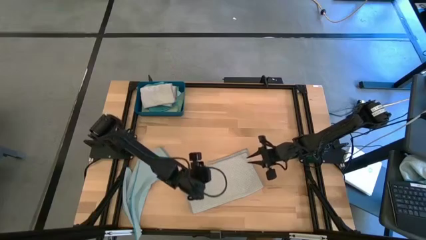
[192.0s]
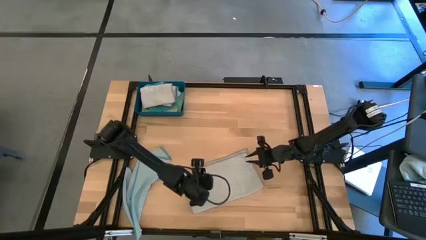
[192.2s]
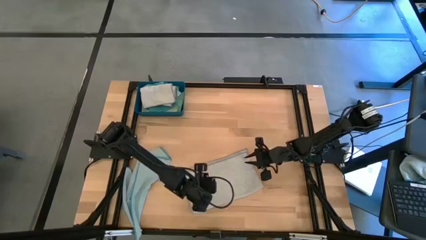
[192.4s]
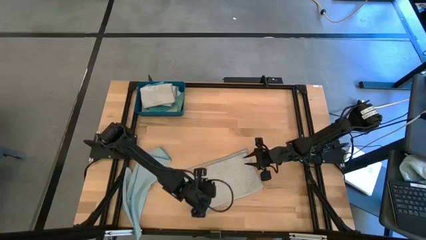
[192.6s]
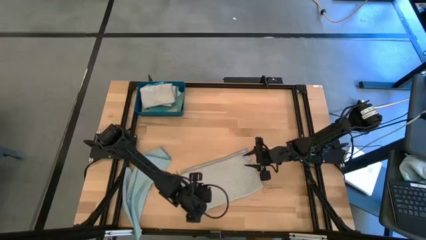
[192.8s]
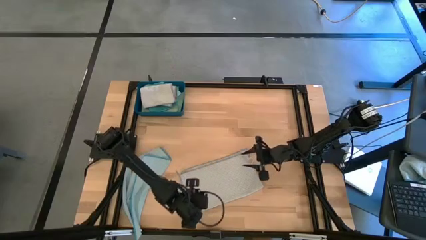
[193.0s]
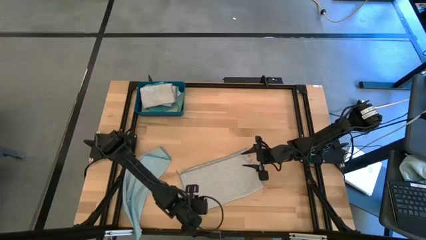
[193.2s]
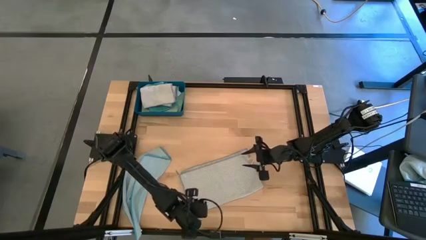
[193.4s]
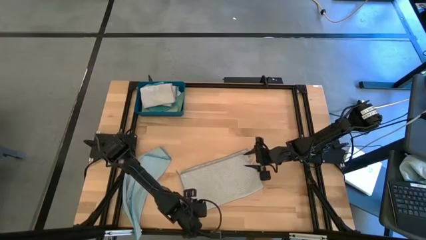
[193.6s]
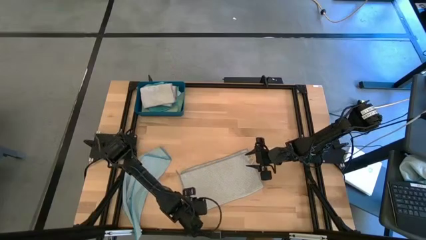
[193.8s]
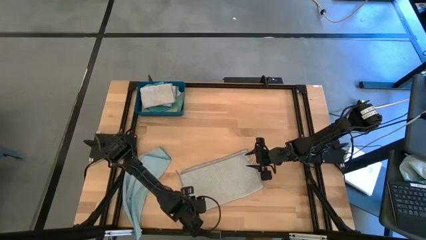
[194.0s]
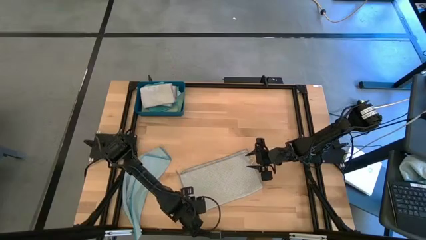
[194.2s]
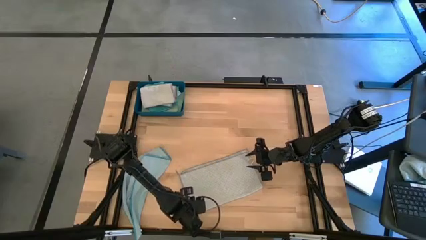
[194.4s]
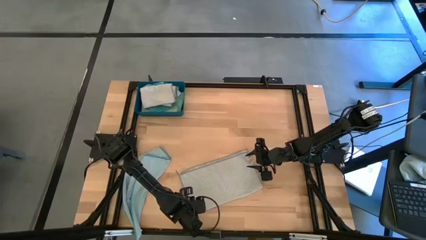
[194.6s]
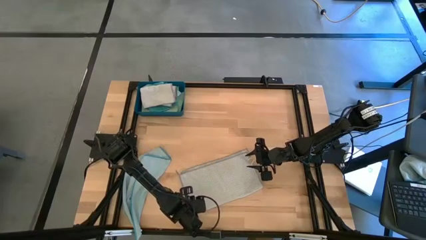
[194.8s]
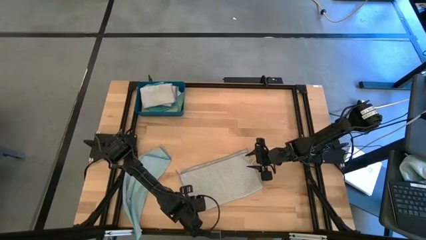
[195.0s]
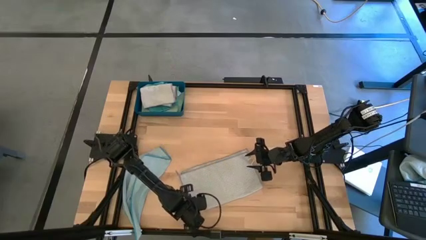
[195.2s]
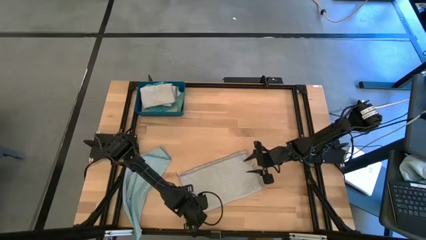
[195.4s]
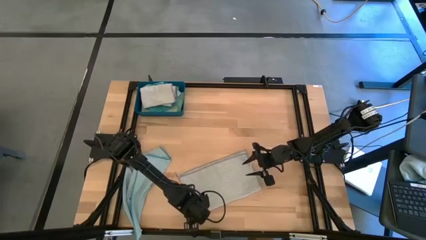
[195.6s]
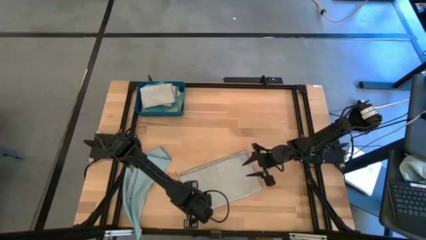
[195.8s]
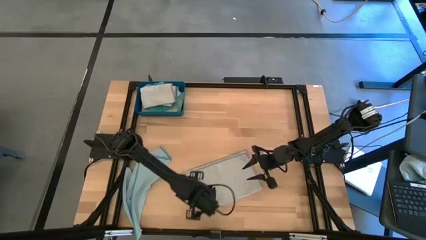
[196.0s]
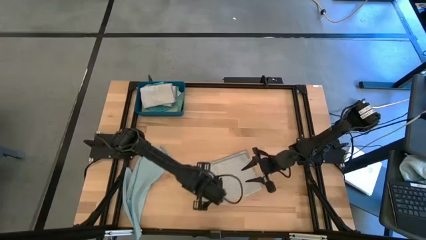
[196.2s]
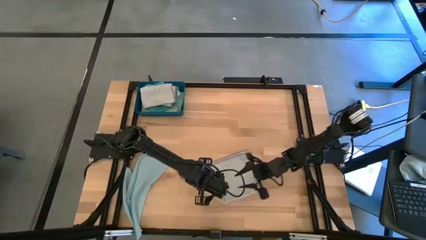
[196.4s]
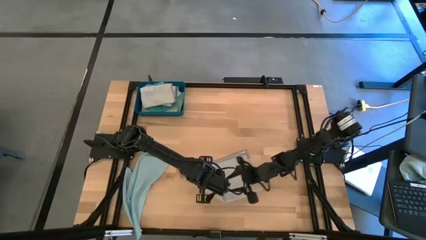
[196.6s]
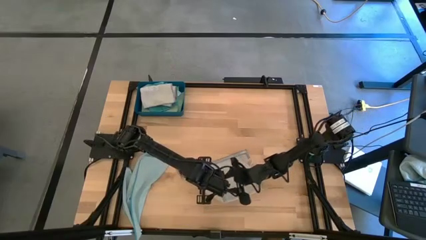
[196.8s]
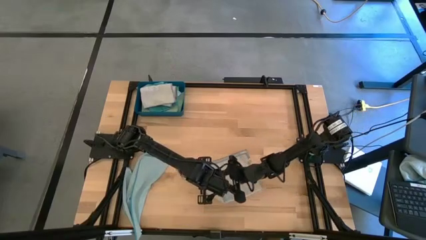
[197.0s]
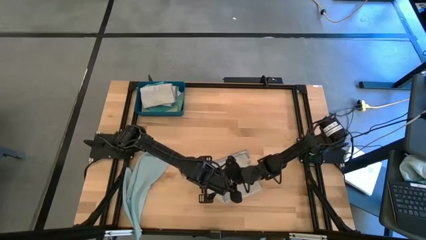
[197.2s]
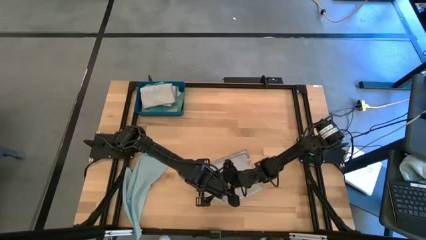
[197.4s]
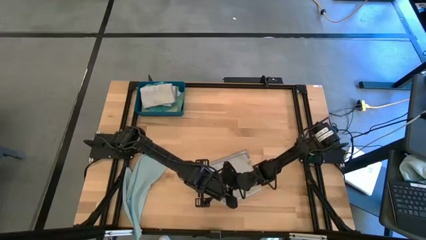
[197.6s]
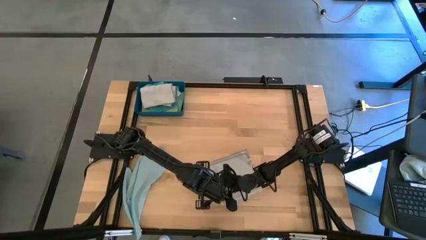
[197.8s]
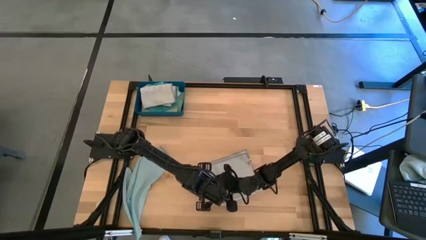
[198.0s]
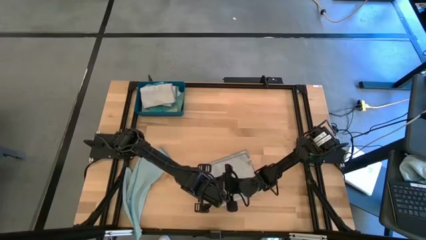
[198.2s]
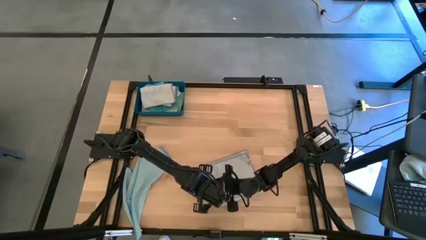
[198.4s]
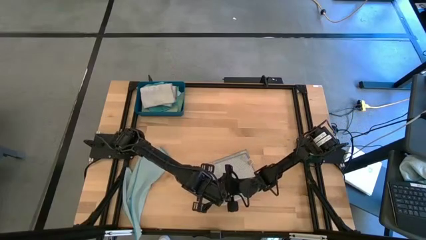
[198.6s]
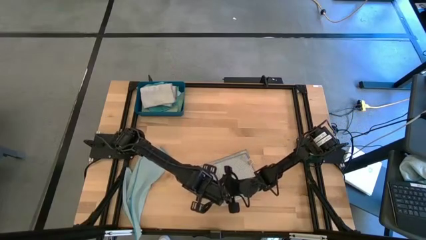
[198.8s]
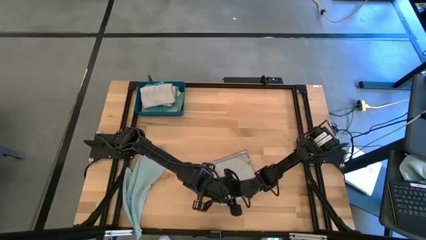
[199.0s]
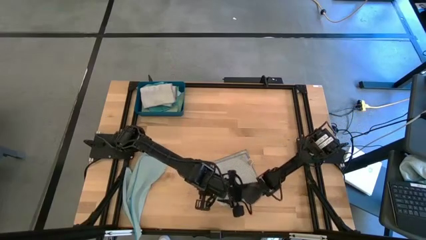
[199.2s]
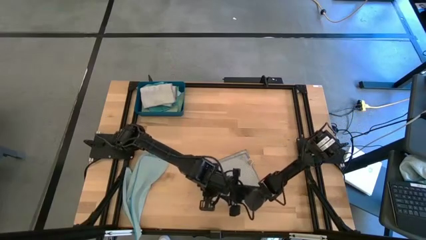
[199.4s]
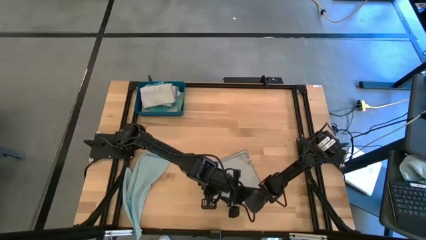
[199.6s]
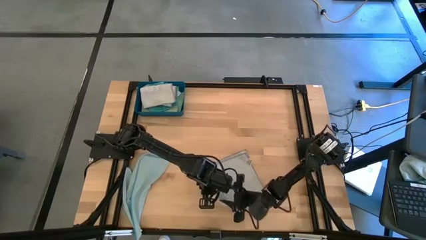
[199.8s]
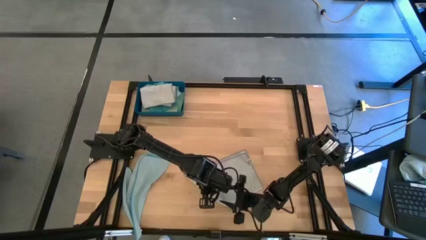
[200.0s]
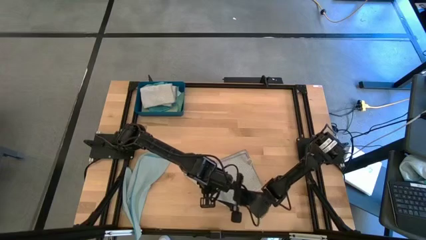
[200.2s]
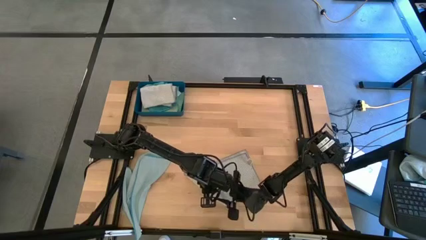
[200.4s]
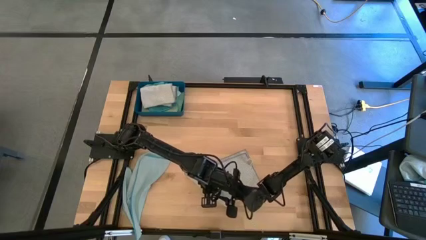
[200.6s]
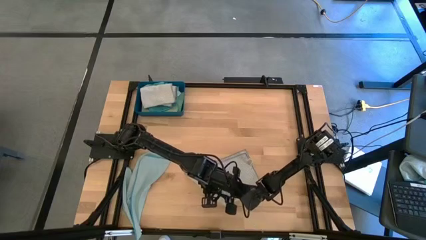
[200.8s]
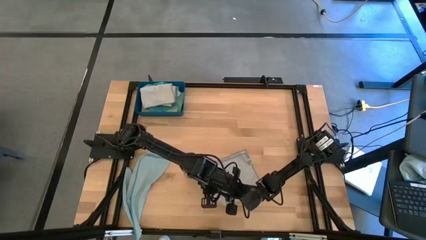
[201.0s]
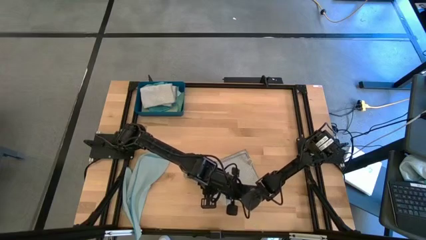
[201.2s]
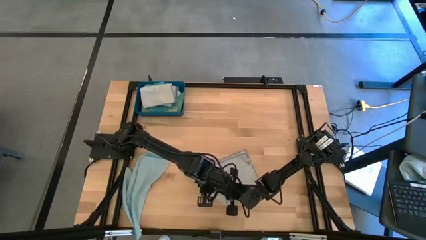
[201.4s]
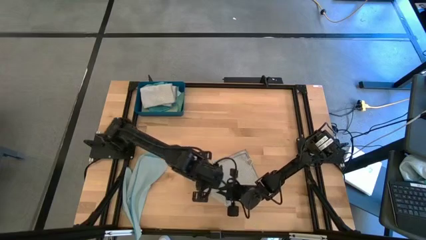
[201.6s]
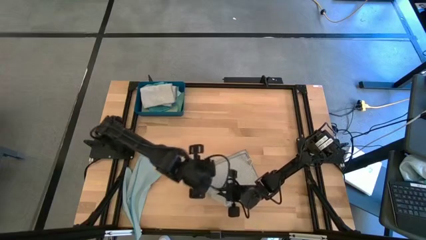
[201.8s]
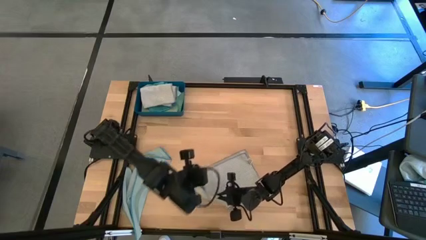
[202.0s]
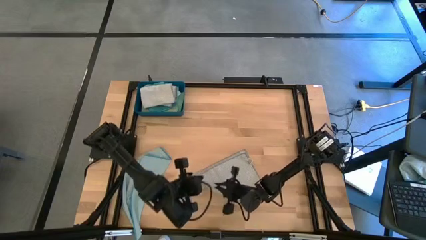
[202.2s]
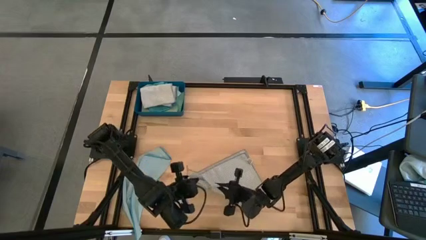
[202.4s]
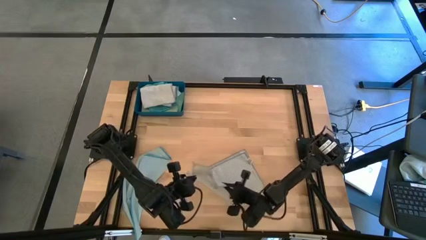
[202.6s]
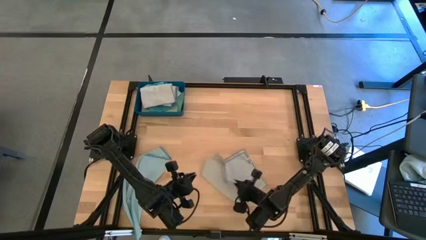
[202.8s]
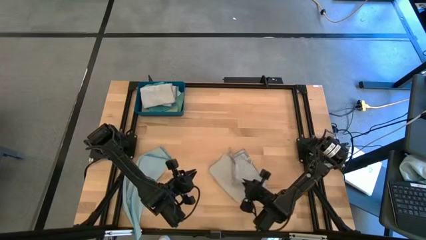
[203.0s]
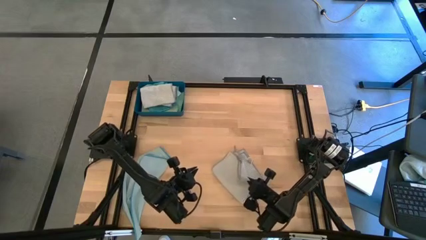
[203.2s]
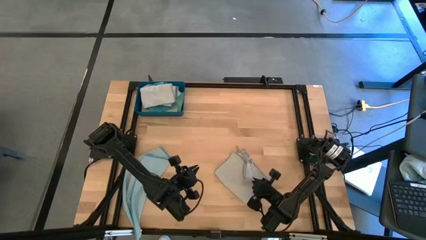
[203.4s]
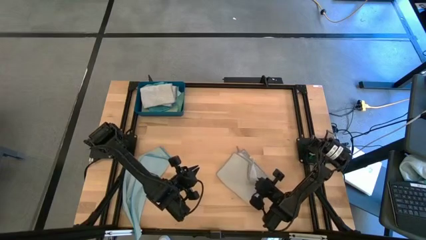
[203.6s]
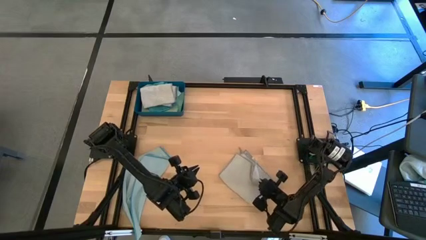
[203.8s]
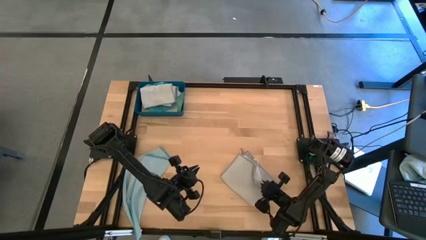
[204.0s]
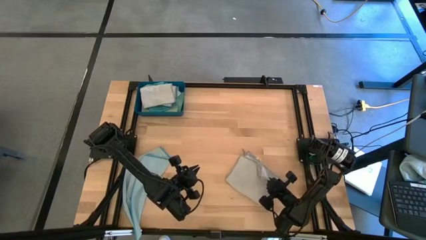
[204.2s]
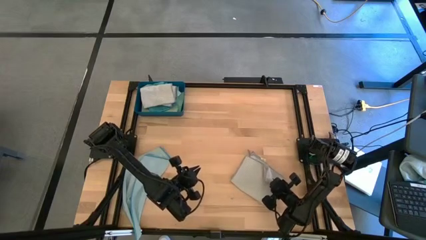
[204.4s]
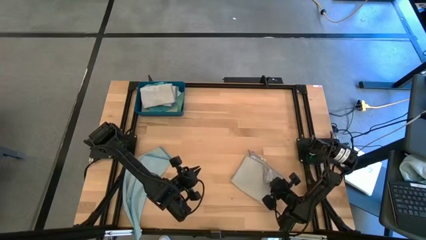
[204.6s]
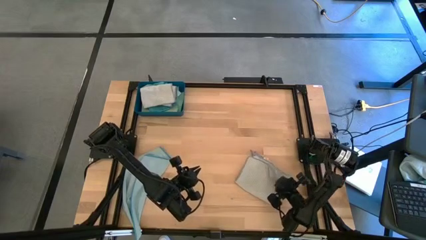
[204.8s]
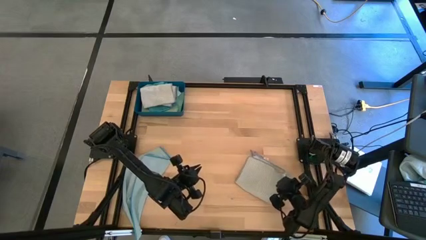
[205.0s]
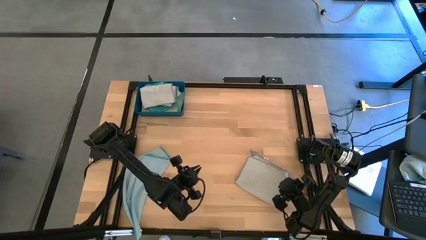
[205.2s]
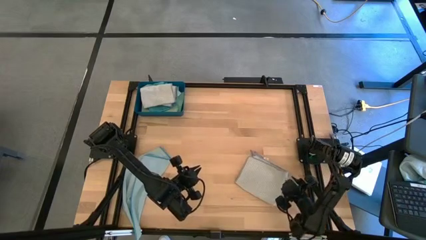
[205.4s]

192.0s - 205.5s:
Task: Fold microfiber towels
Fold the gray towel
